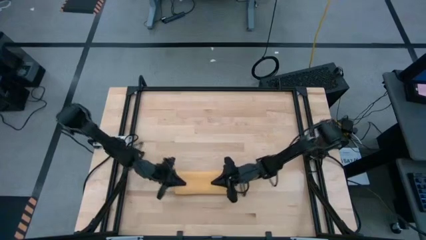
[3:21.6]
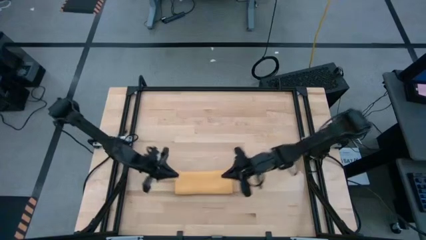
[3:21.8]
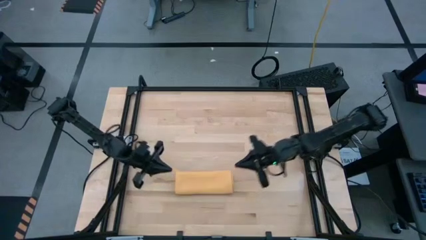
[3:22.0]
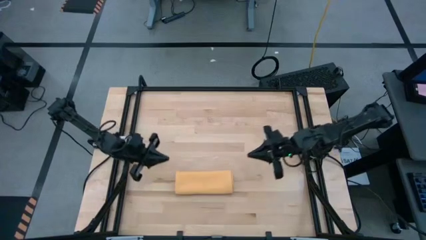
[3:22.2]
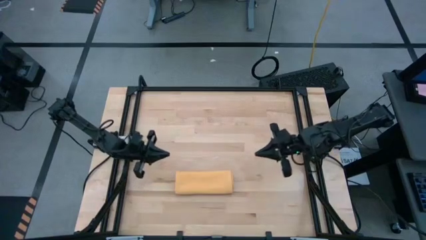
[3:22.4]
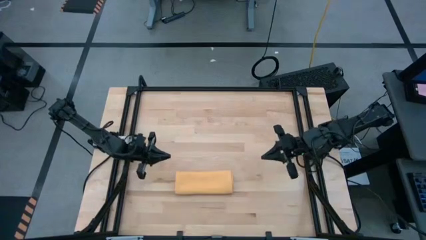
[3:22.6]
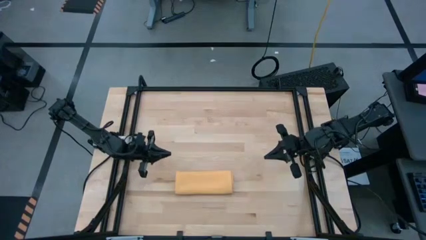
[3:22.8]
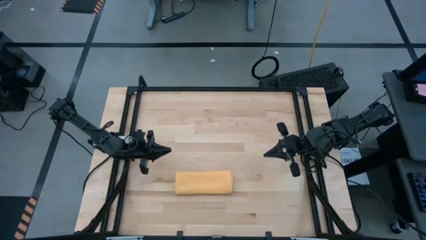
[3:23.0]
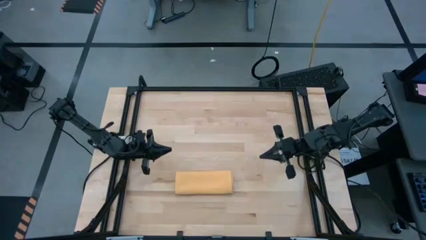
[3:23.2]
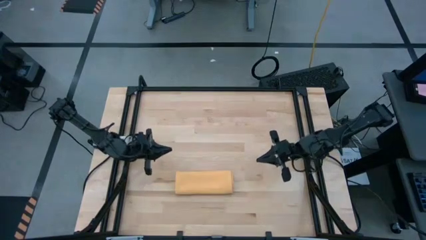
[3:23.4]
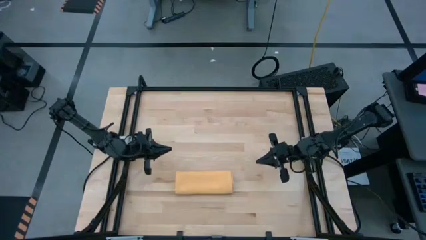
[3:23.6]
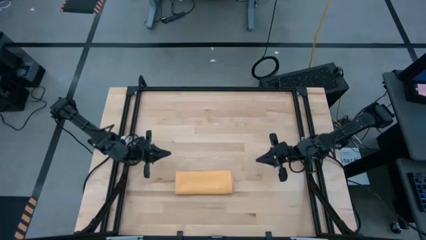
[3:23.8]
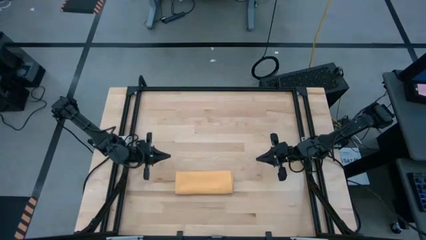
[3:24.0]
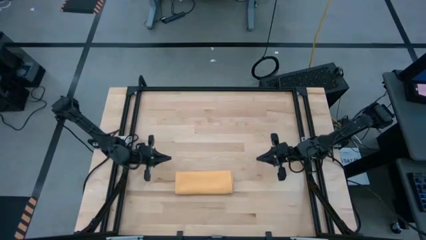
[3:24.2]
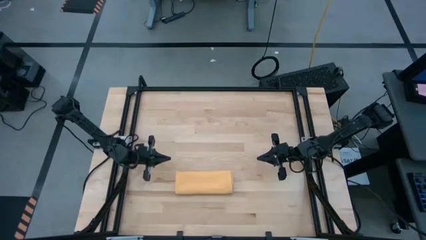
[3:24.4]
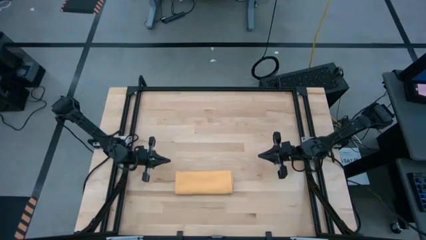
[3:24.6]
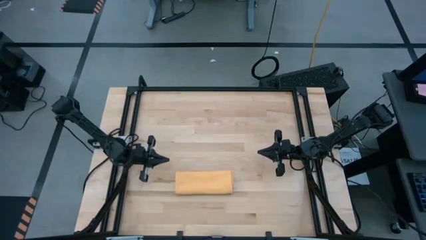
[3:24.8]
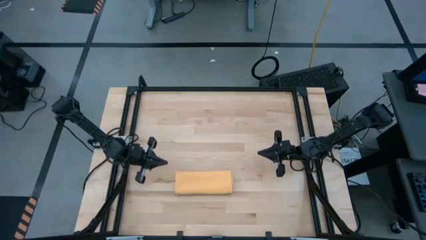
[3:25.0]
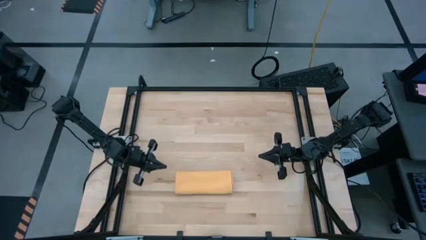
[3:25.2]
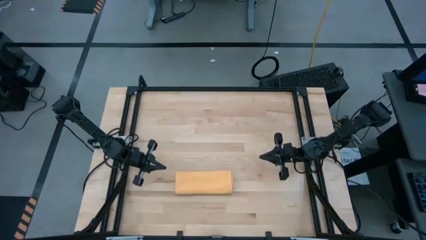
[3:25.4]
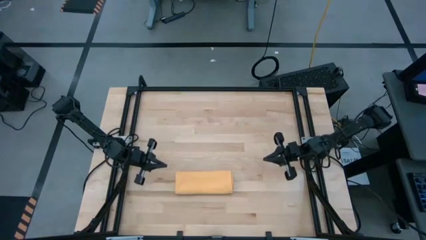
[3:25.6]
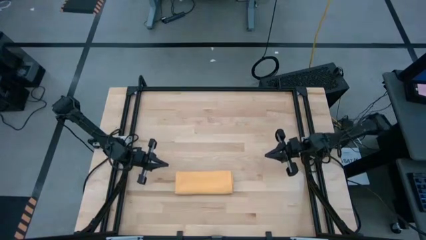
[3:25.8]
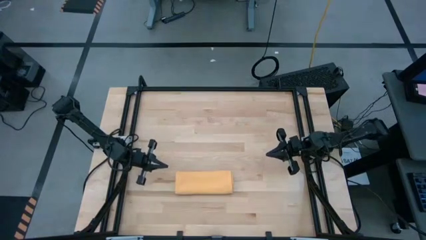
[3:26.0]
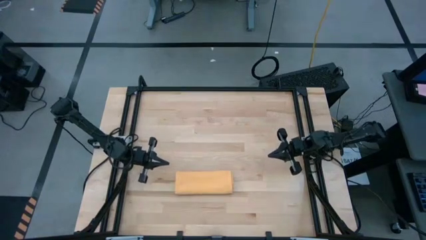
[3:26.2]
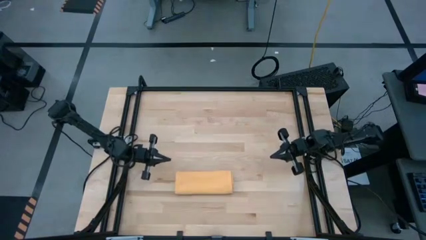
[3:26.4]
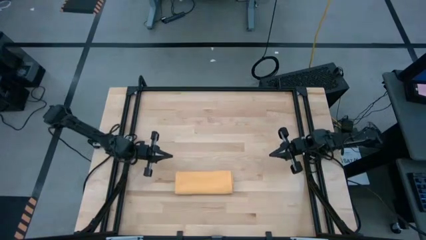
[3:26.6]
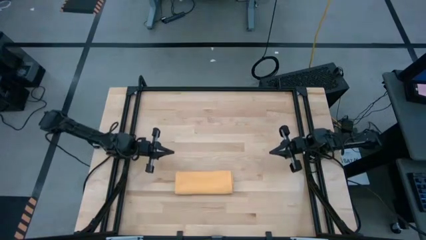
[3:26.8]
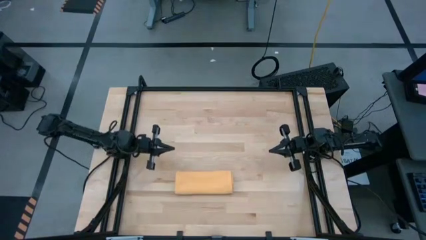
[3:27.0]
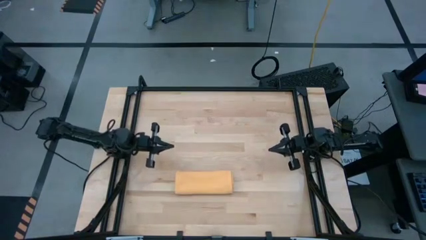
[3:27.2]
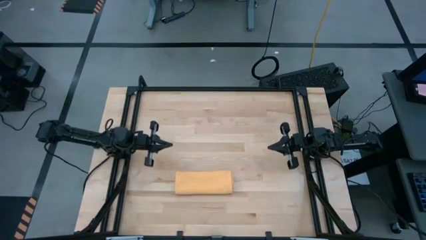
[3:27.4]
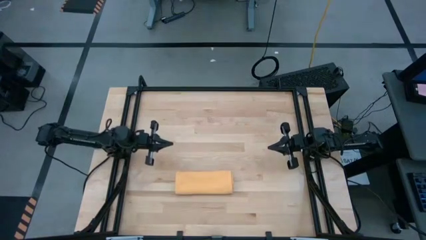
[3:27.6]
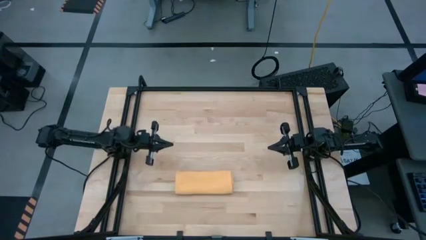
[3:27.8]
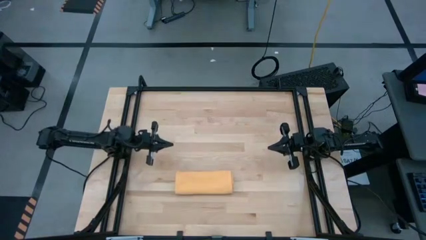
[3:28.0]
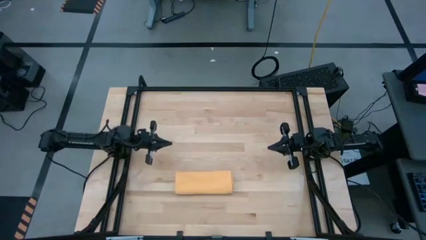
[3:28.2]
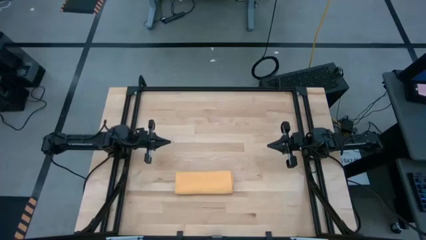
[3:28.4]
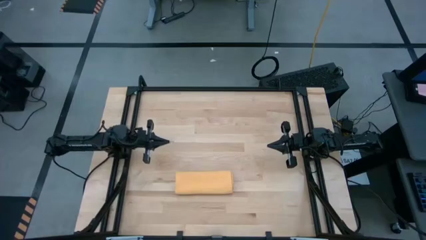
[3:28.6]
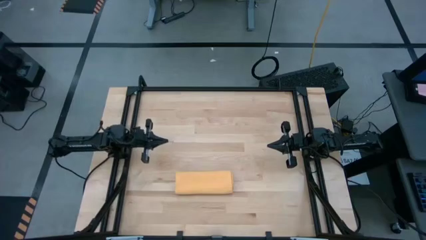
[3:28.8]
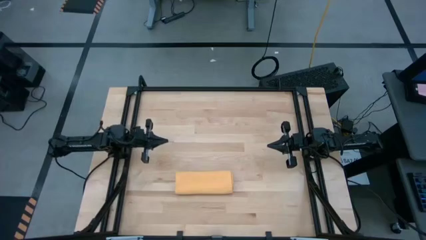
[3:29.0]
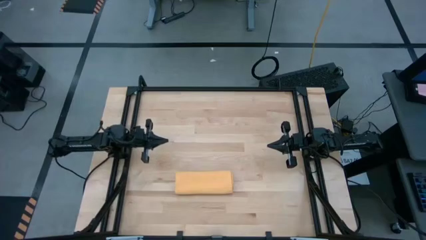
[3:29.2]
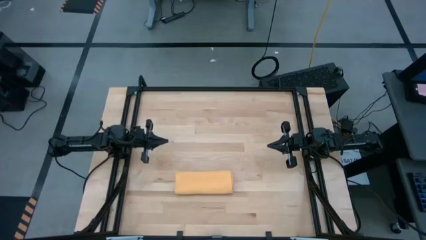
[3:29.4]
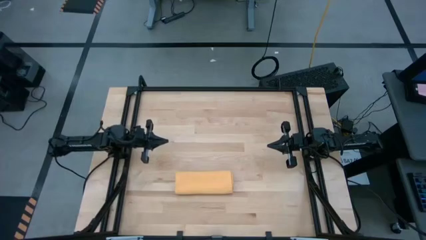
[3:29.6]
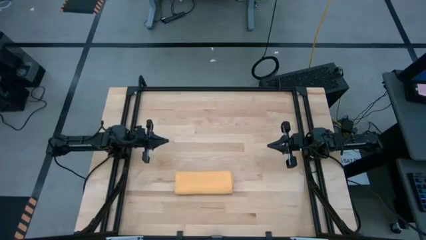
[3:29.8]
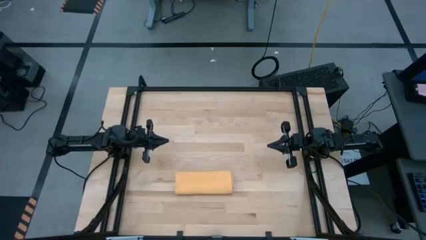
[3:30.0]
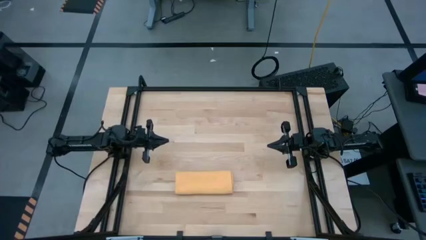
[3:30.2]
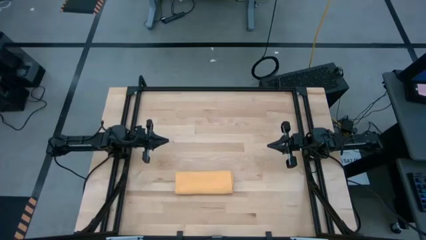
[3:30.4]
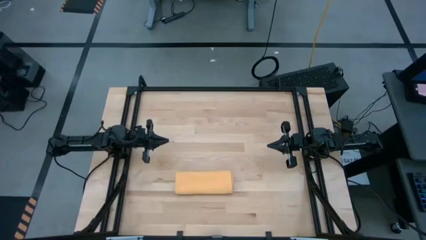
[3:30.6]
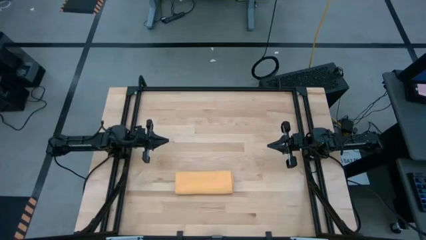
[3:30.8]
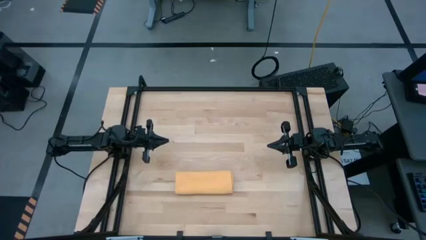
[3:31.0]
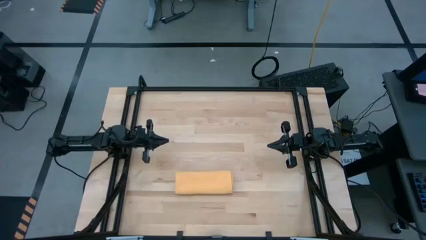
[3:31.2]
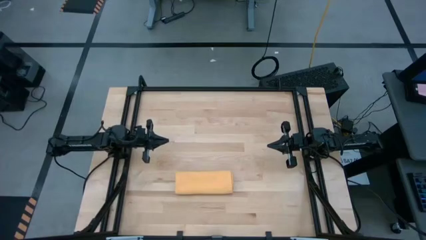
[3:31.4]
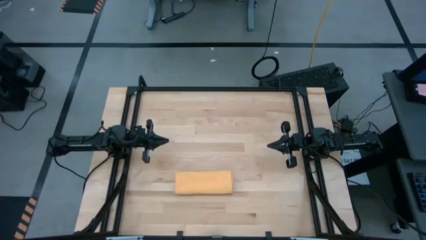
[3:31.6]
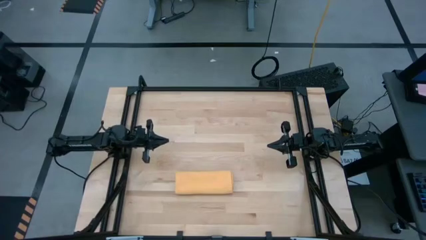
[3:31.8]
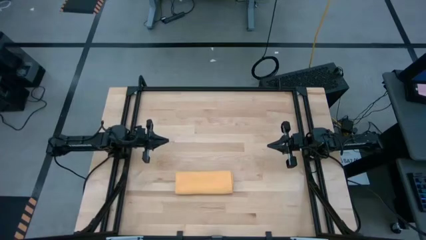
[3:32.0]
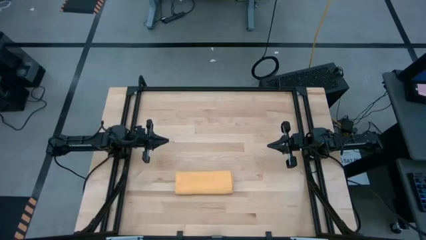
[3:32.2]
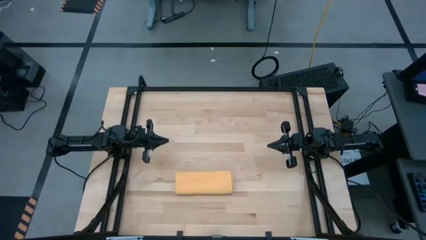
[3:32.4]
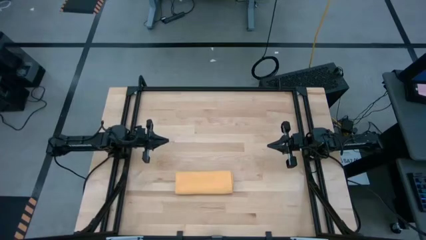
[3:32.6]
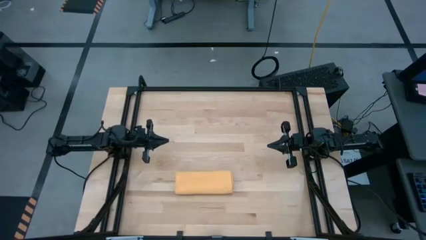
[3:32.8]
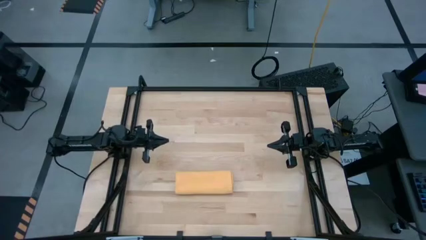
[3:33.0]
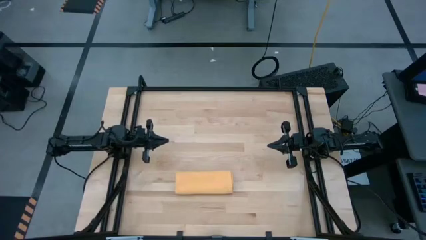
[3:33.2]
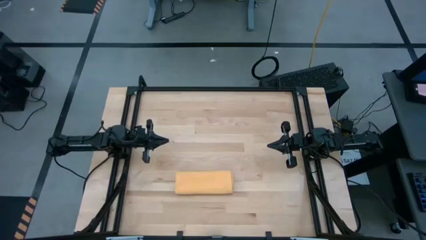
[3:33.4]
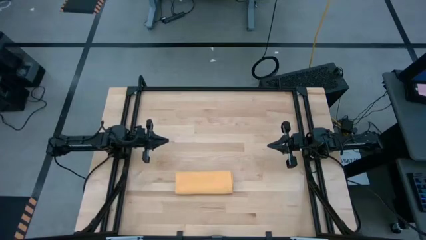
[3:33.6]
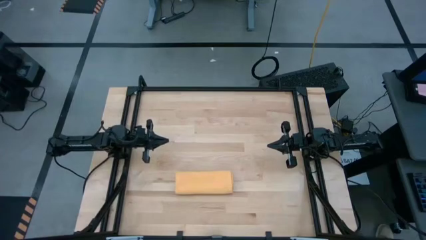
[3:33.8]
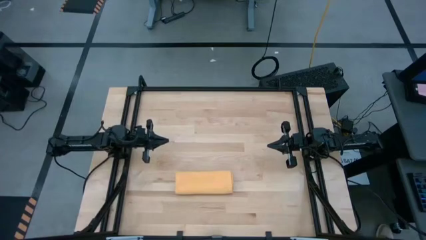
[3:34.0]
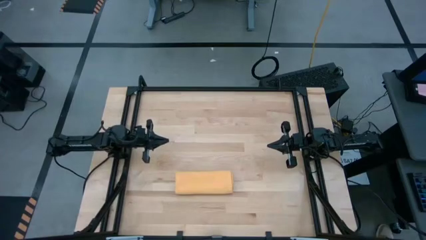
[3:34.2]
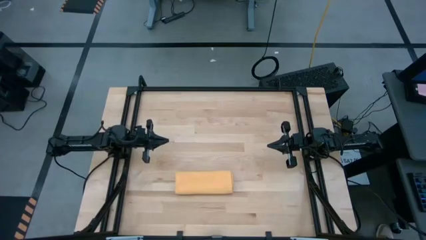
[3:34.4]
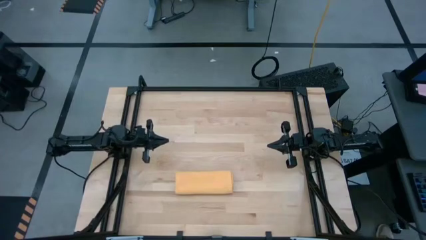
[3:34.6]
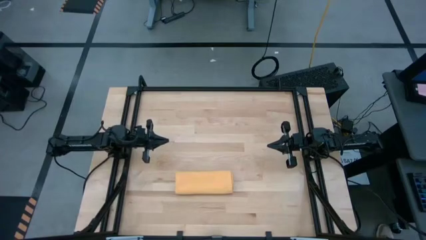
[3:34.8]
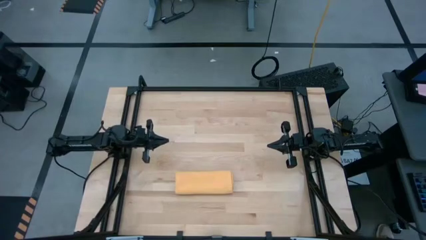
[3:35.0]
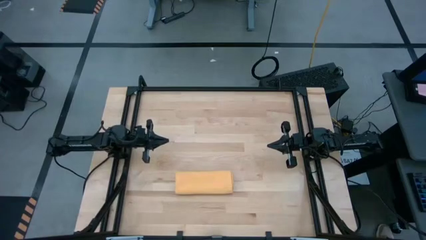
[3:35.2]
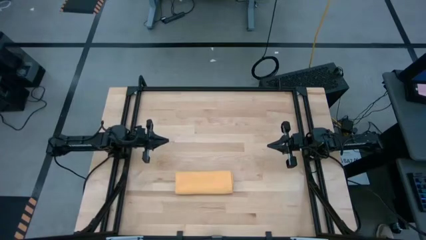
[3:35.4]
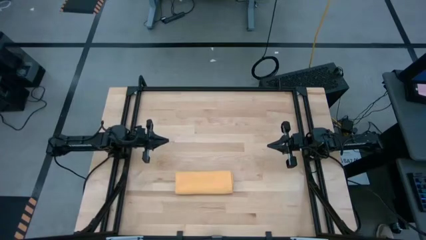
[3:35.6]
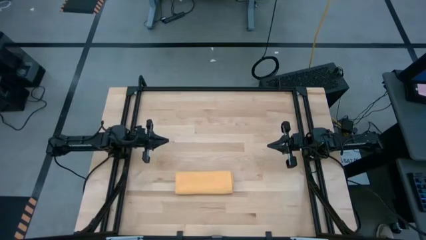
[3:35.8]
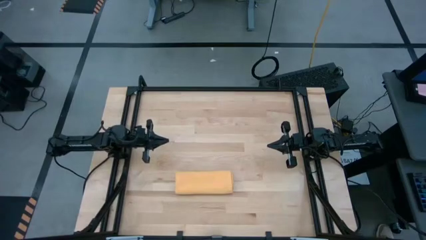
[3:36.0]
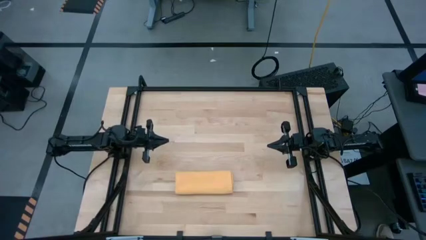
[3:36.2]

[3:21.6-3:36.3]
Task: Roll towel
Return to Home Position

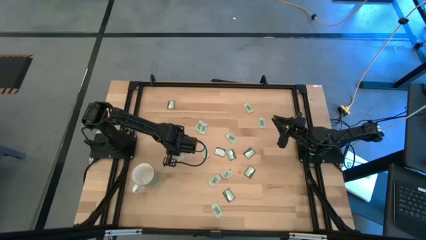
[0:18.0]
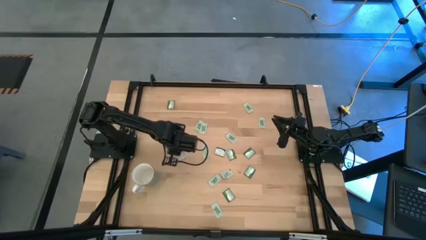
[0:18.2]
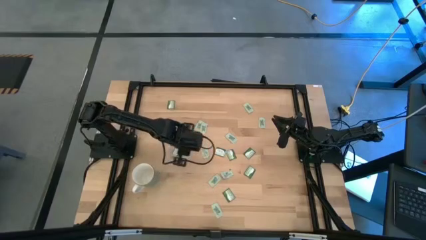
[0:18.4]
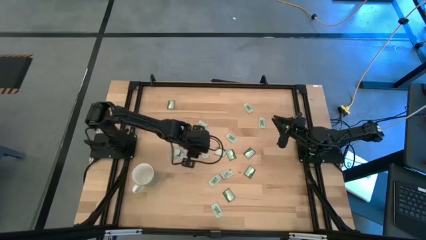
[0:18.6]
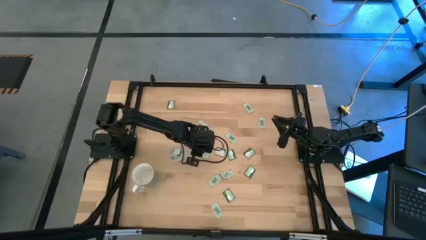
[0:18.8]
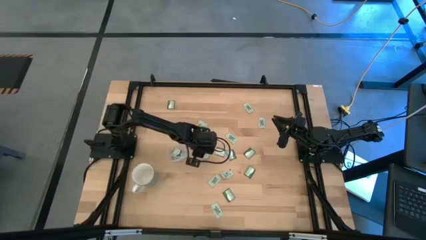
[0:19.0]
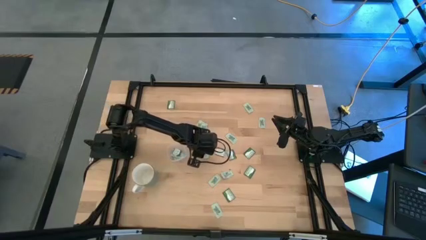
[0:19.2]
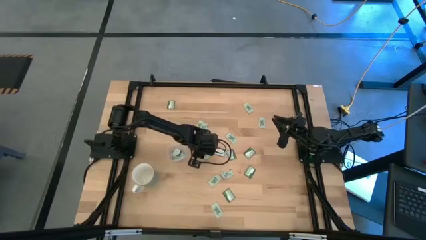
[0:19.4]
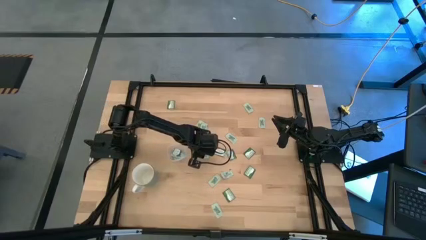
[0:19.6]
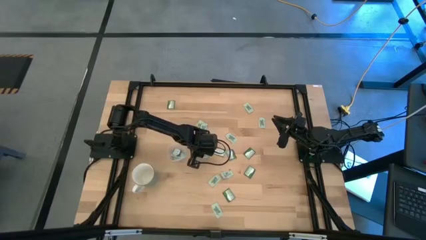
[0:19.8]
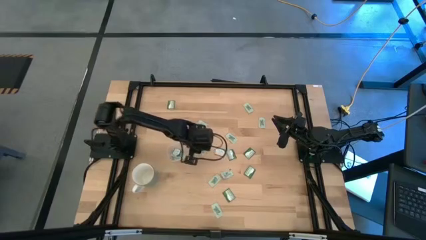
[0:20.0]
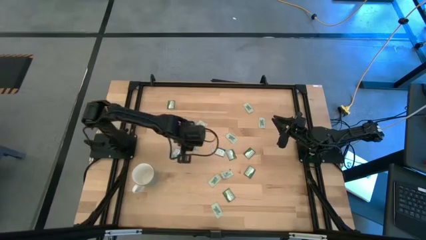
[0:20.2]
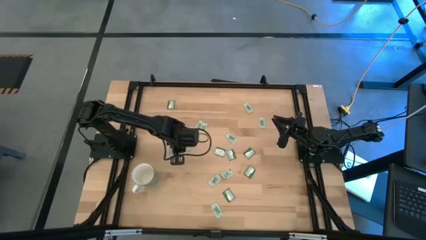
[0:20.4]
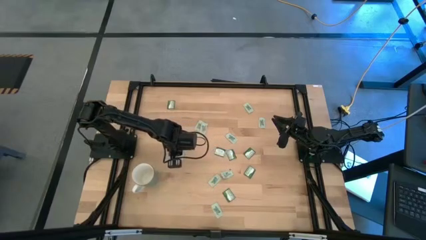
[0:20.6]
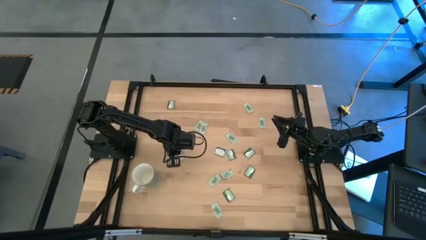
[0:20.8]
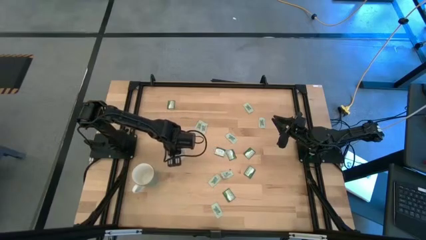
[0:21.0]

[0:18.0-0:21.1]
Task: Pick and place Stevia / Truvia into bins
Put the green stevia packet into the transparent container
